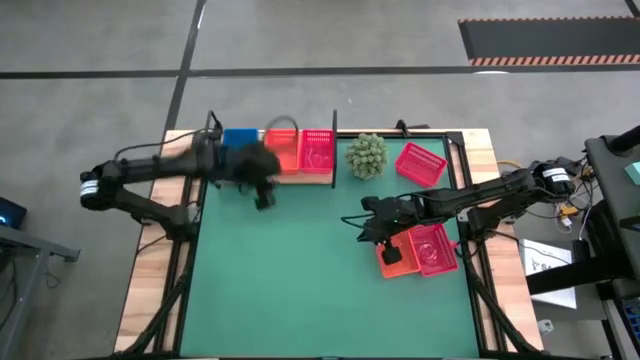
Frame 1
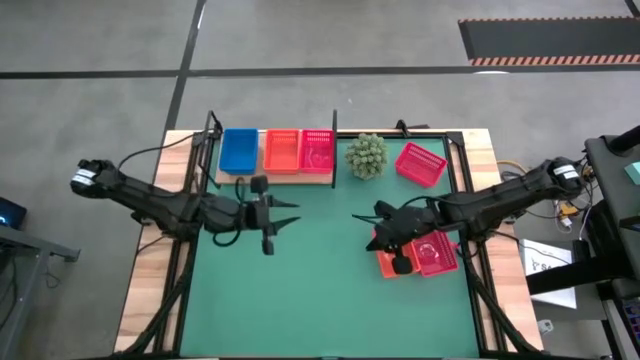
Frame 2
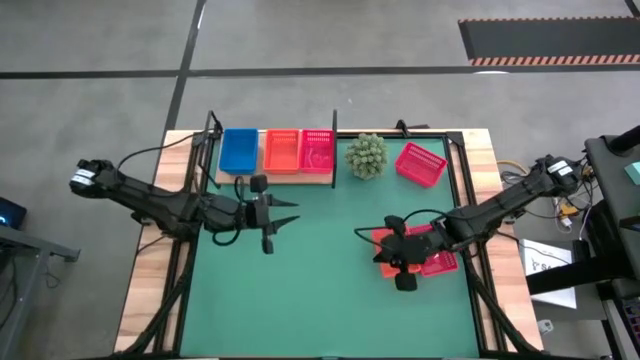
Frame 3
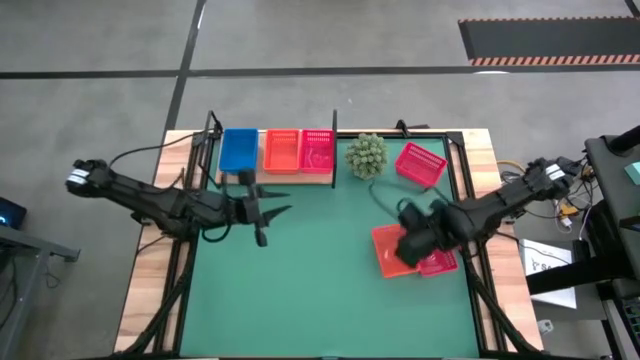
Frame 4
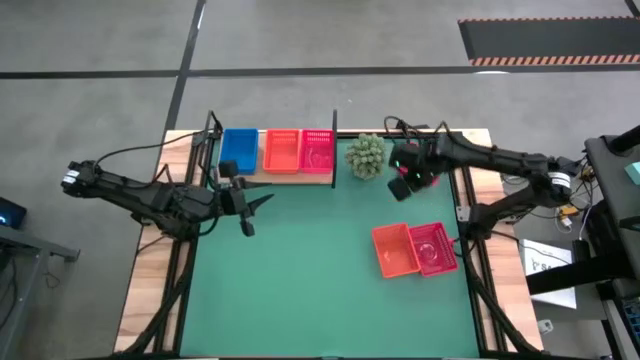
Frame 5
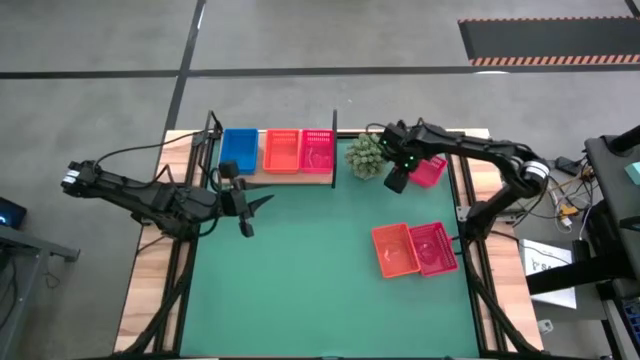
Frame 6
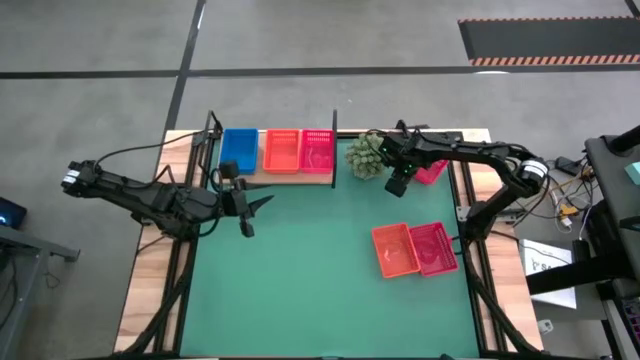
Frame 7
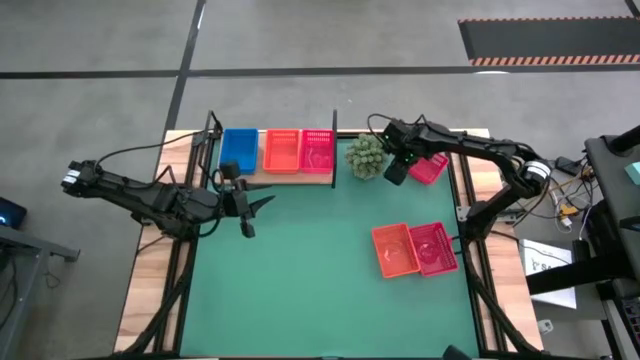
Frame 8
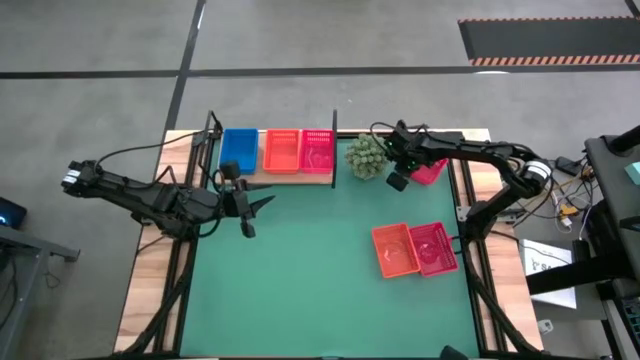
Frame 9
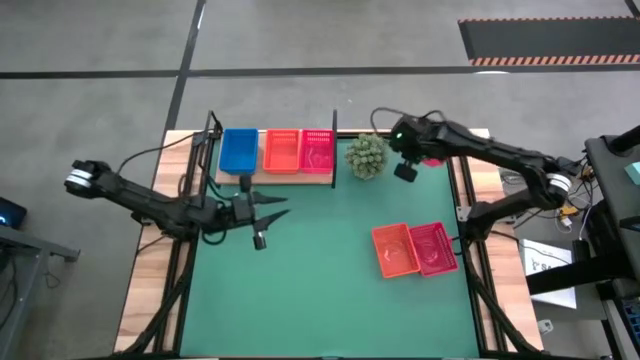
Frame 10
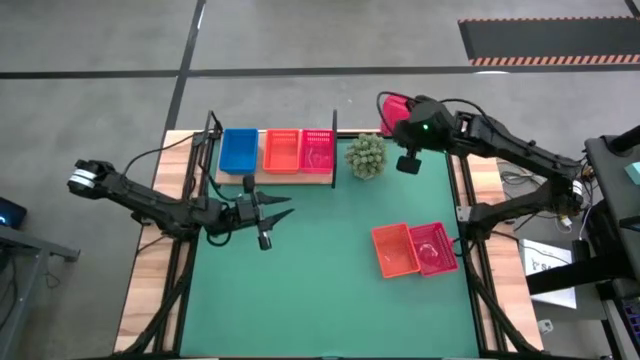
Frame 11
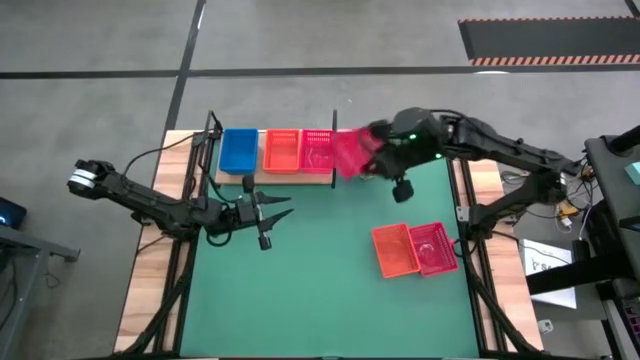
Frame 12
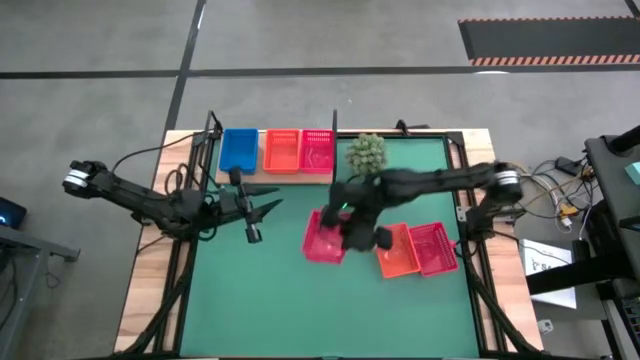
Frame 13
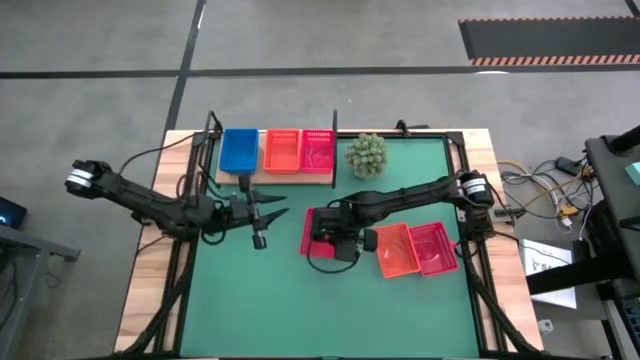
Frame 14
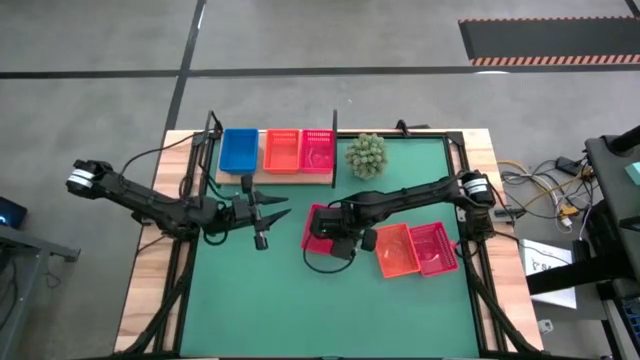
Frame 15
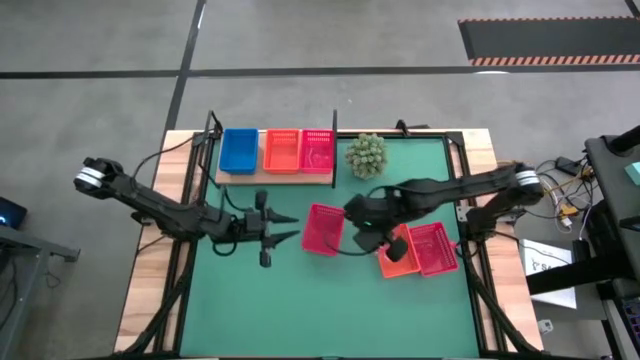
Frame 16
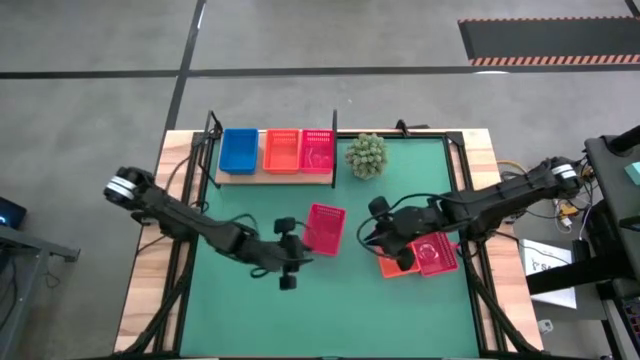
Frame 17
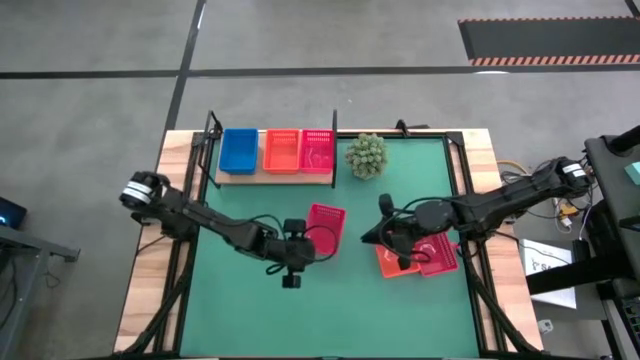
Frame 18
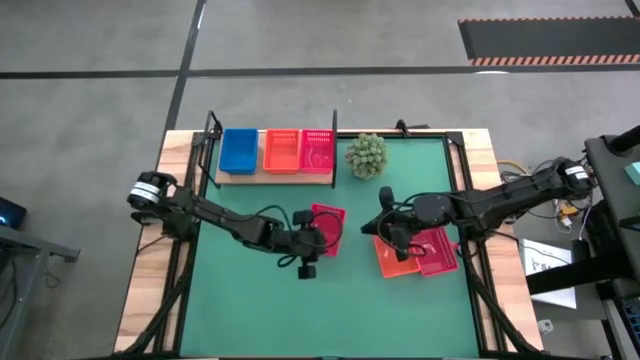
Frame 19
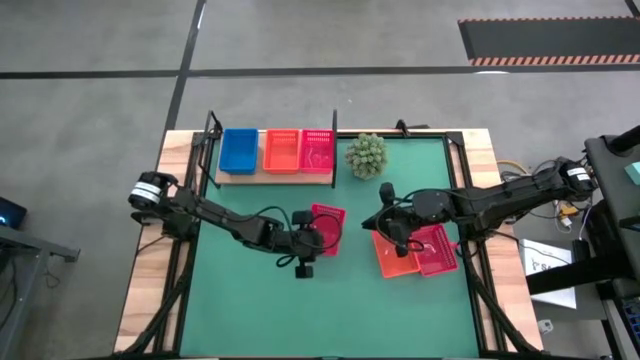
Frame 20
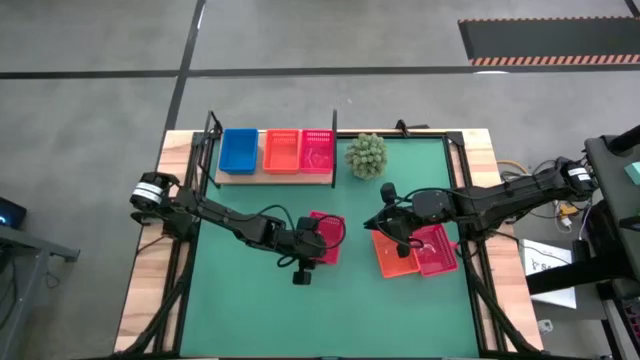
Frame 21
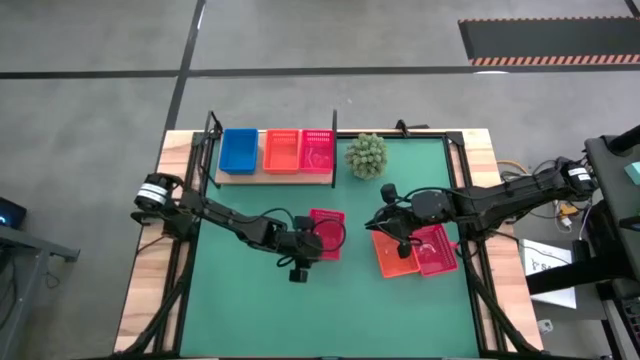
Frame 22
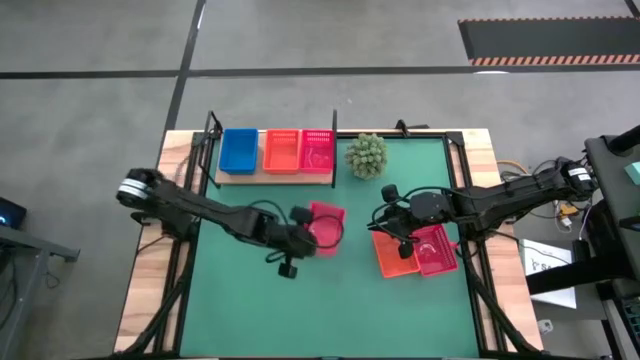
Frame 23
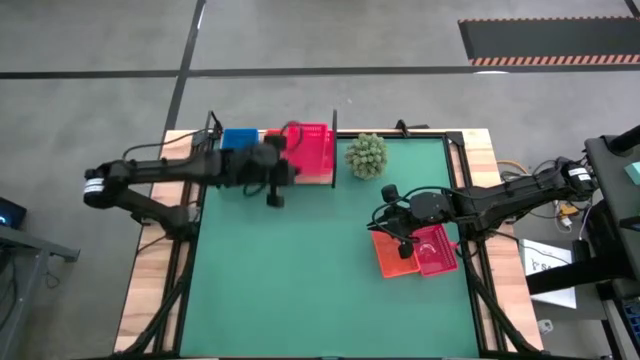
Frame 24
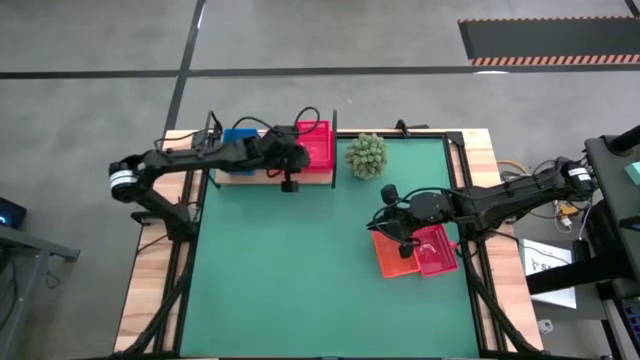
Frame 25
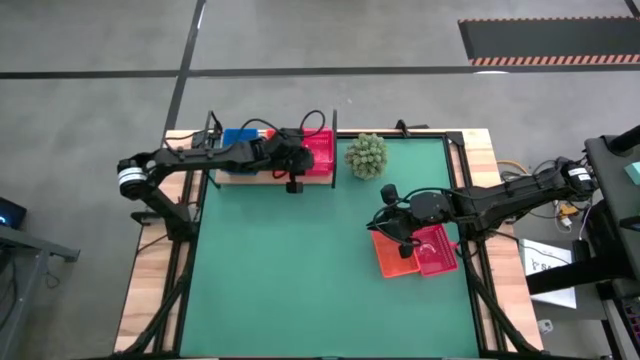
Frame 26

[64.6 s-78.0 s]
Task: Stack baskets on shelf by color
Stack the top red bin on the red bin on the shelf

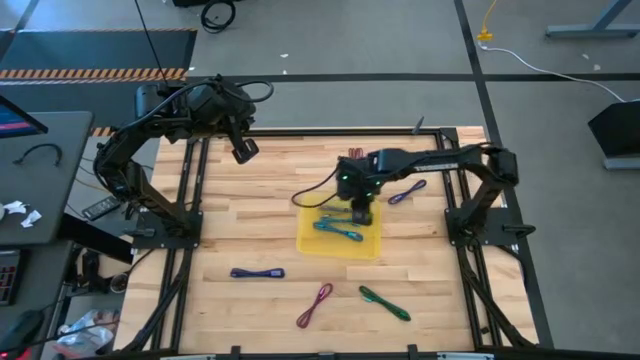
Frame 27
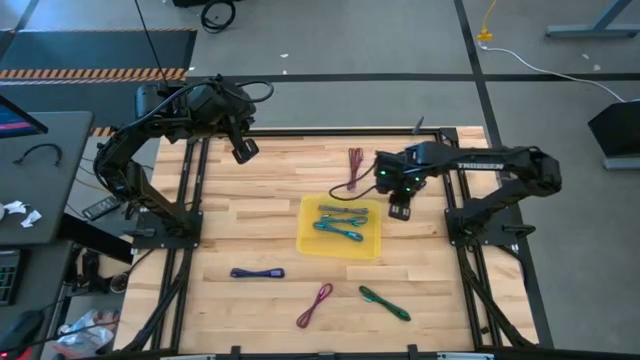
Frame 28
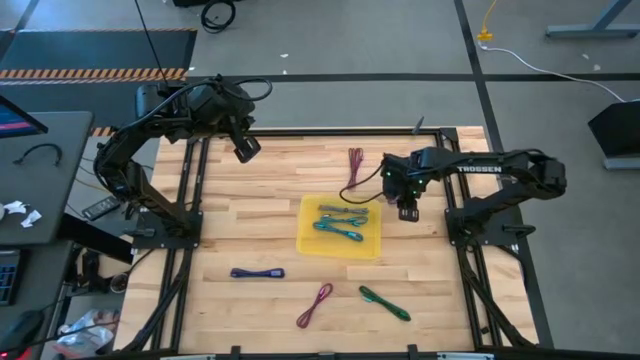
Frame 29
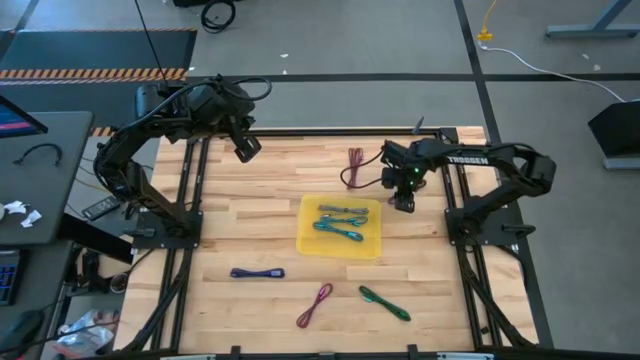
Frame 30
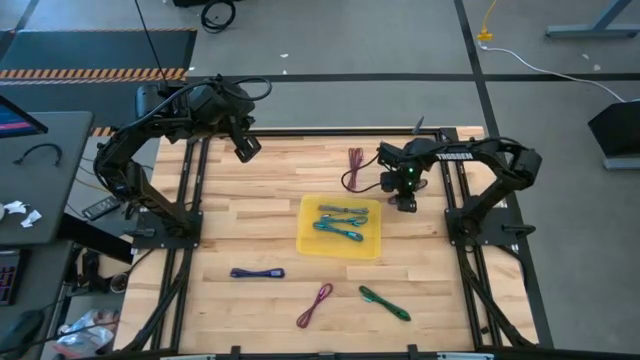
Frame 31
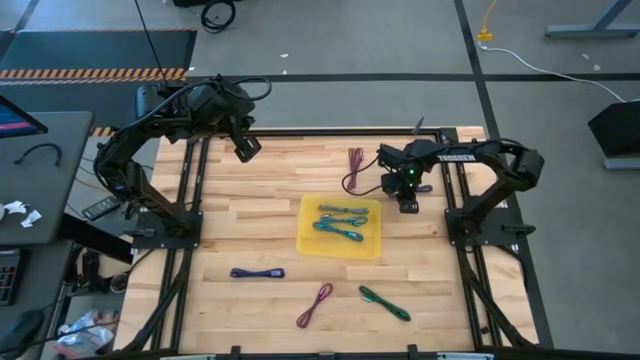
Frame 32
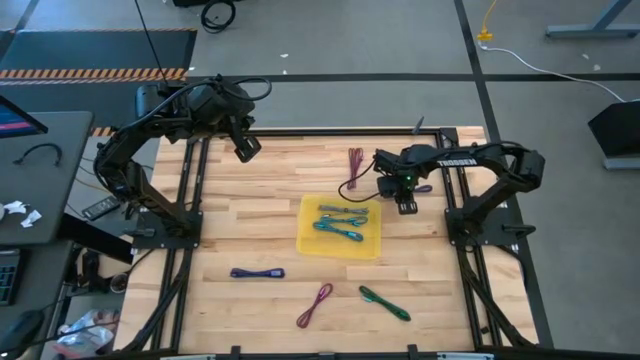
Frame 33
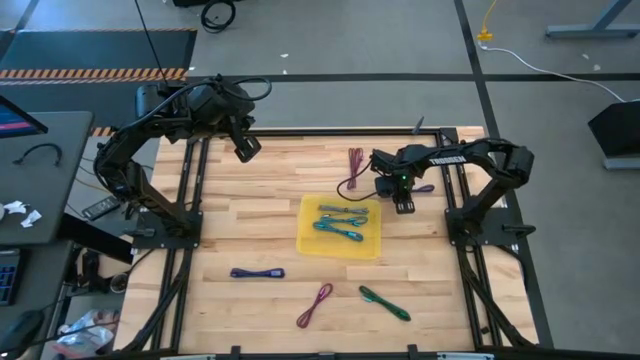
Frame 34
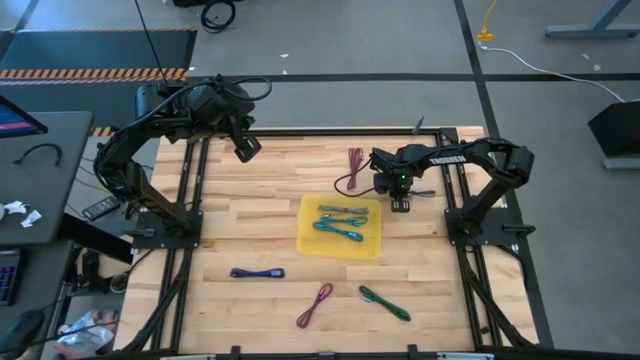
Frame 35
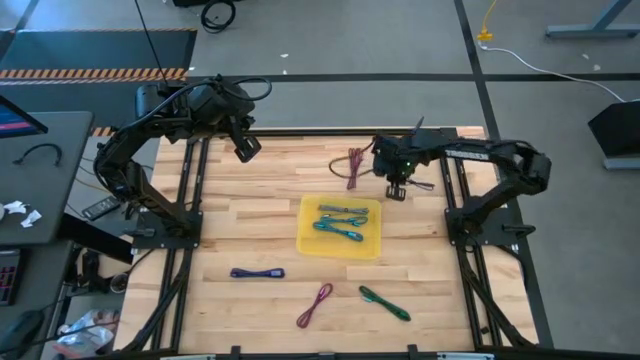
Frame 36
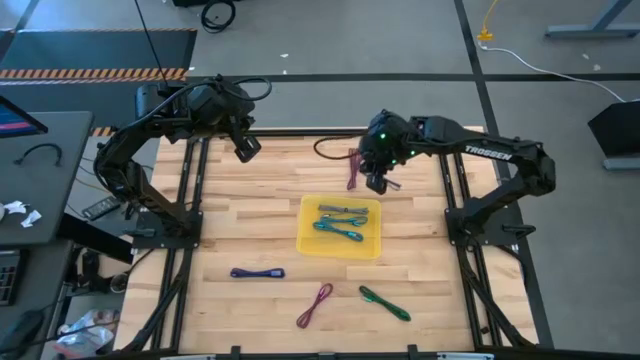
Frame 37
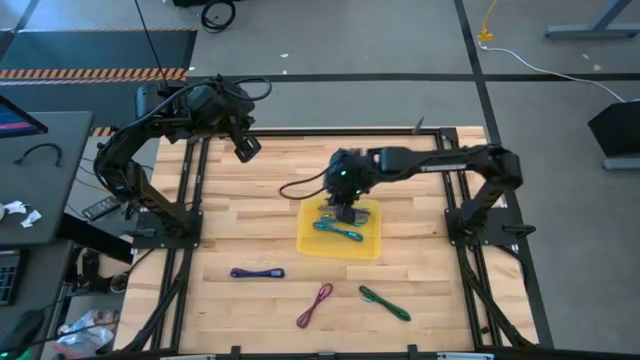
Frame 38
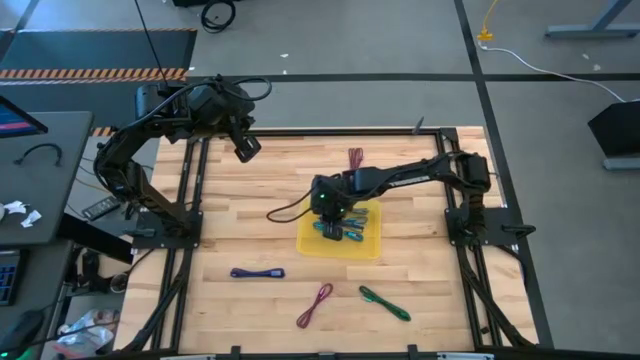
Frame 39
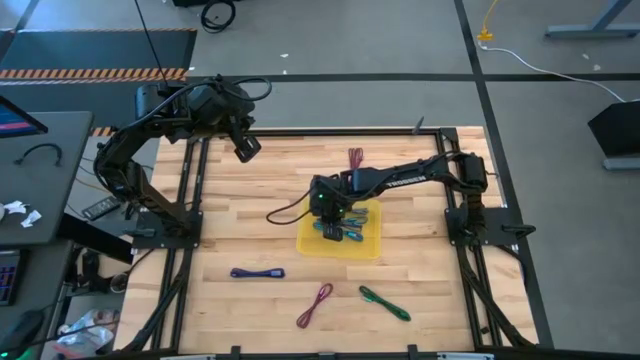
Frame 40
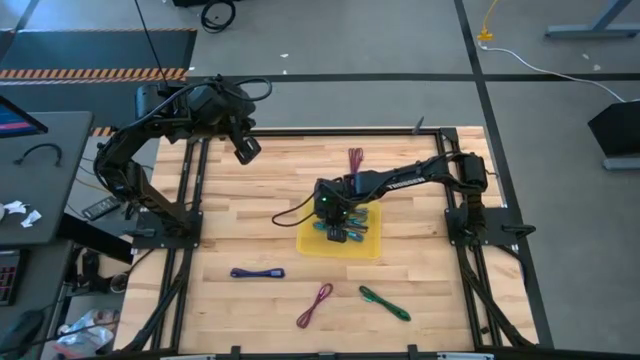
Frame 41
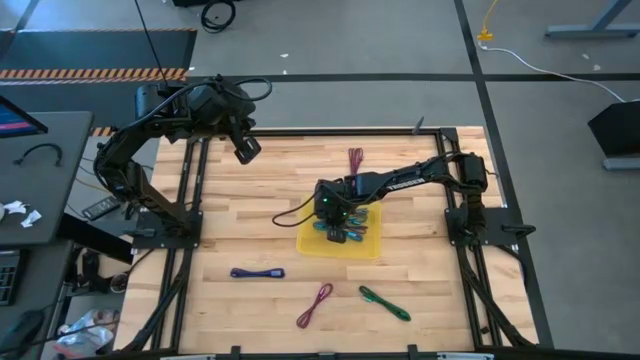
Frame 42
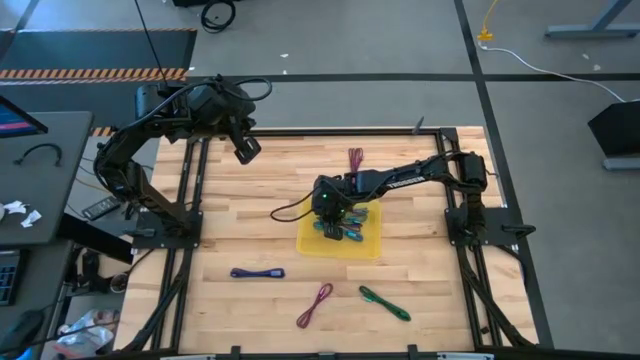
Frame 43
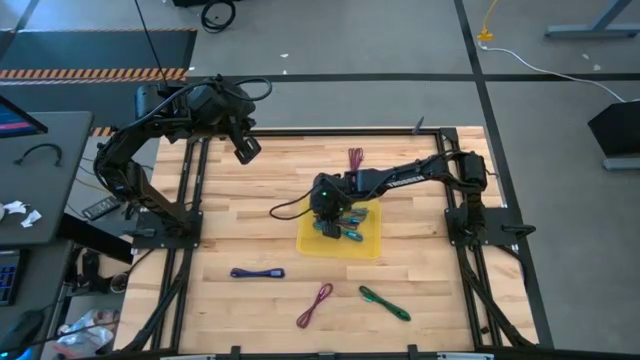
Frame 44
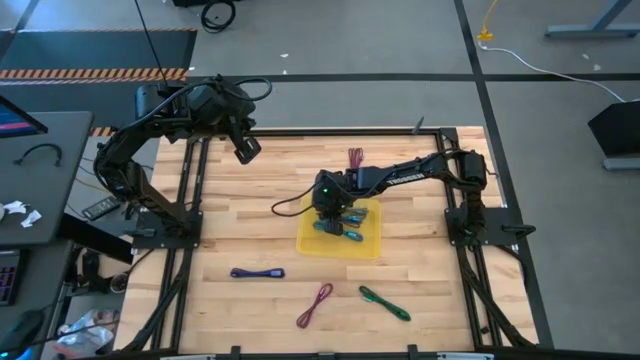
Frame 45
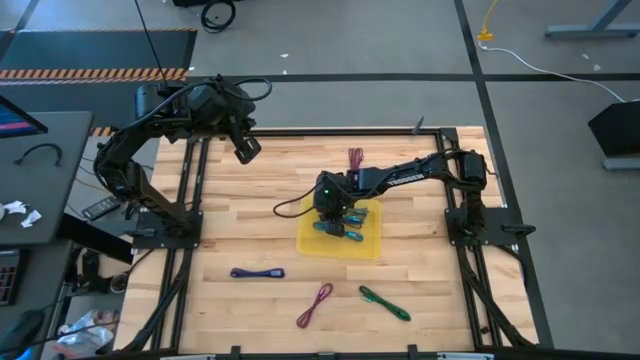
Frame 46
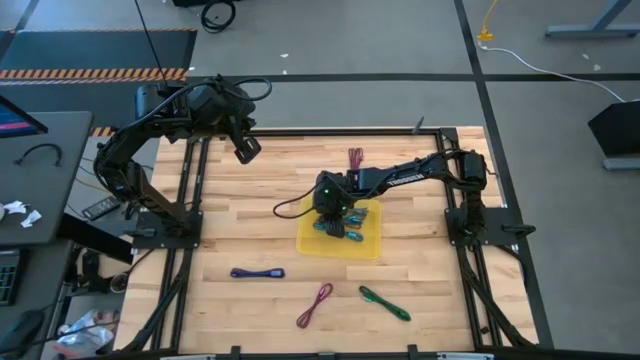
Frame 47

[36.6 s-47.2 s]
Task: Pick and place USB-C Cables
Put the top purple charger cable into the yellow bin
